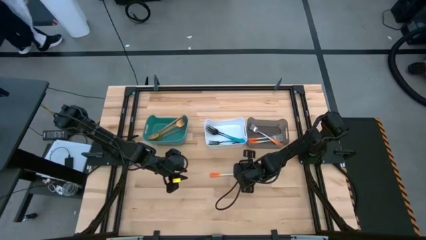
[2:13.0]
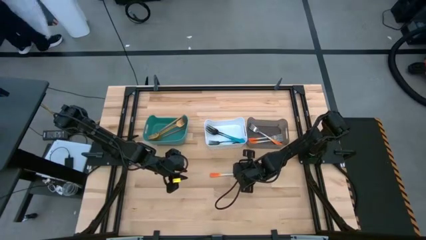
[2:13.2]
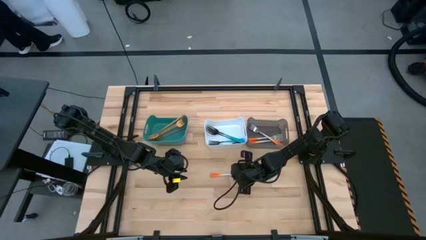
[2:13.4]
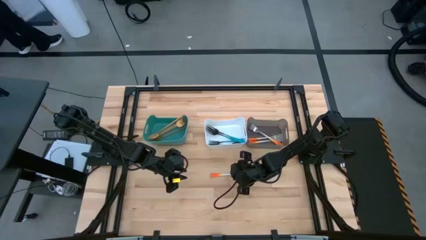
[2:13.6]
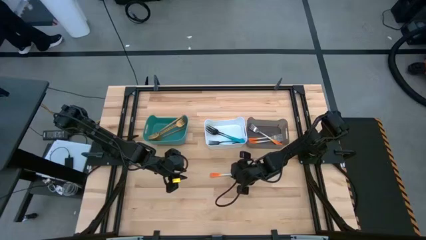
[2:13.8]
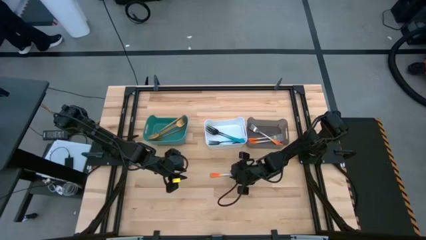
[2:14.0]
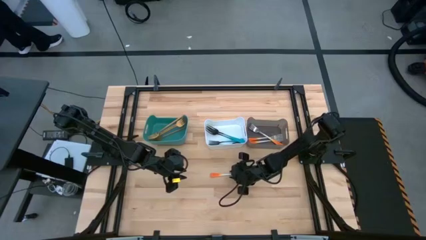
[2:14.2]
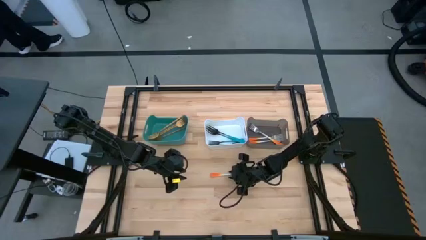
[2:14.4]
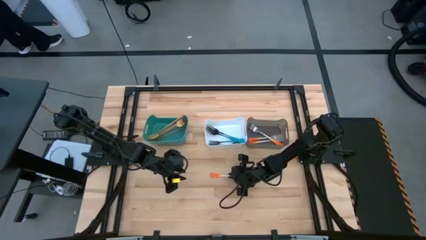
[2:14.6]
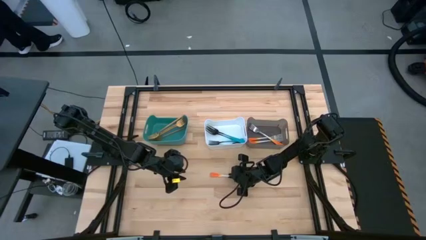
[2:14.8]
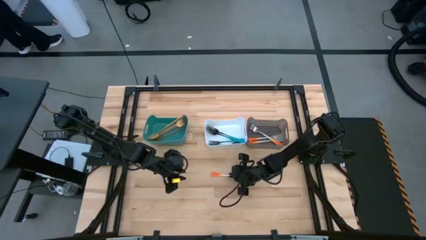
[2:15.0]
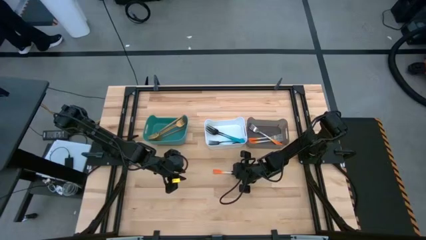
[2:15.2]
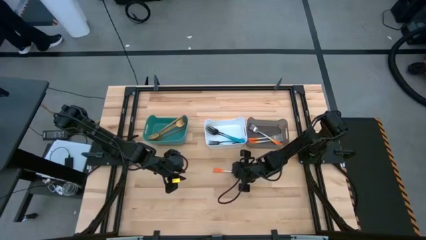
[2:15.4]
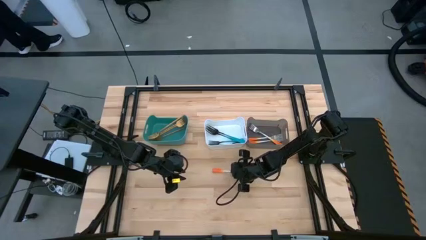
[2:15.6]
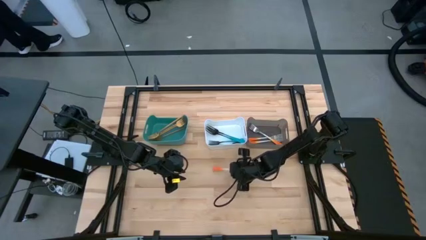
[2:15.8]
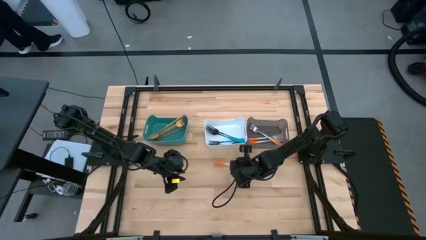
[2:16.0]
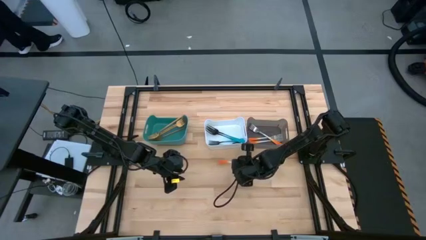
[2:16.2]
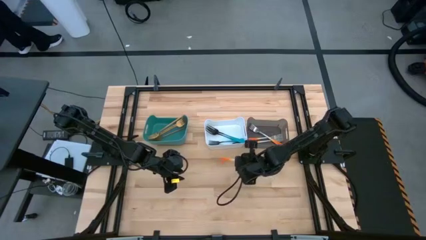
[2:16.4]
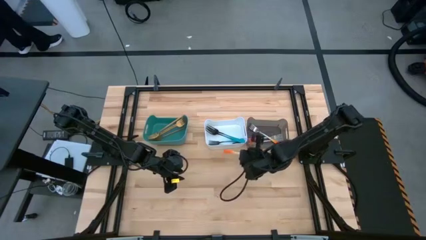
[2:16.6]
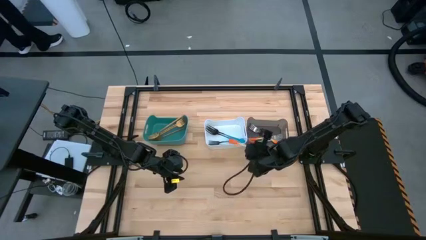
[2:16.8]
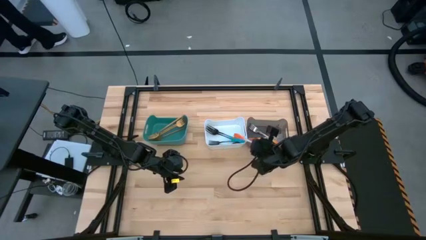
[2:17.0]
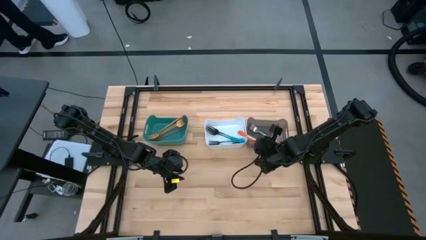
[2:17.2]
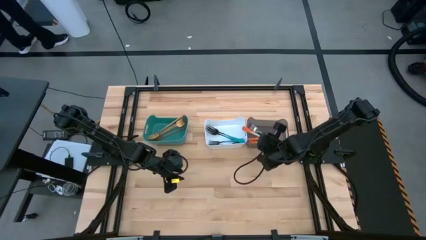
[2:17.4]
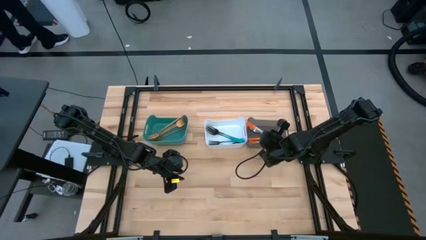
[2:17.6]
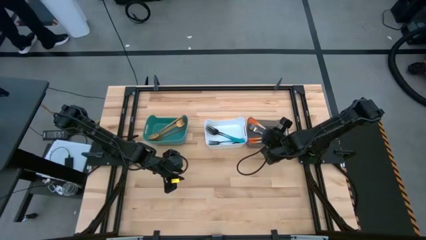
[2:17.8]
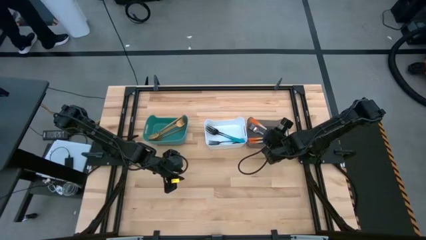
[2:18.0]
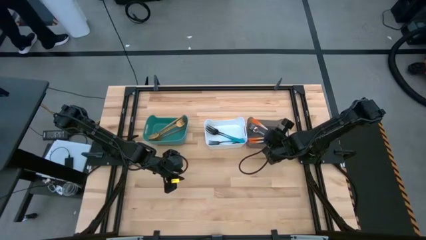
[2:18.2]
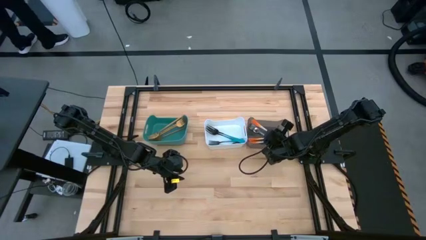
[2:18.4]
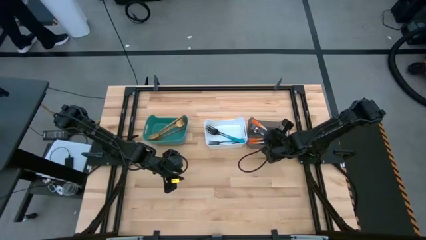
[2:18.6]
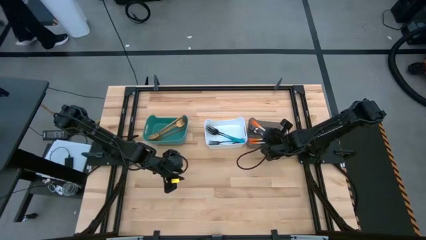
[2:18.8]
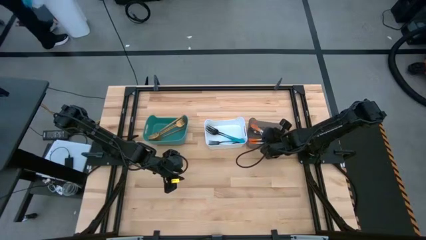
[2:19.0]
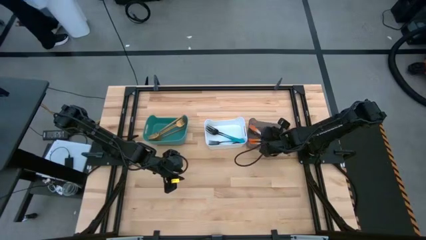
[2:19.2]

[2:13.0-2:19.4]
Task: Sort silverware by color (type)
Put the orange fork into the transparent black bin

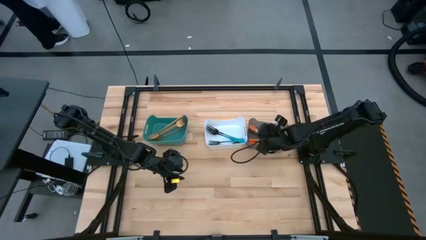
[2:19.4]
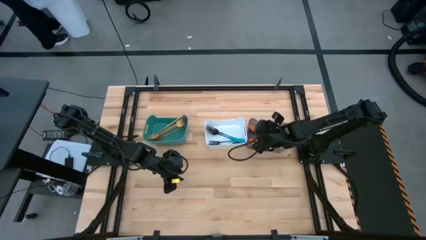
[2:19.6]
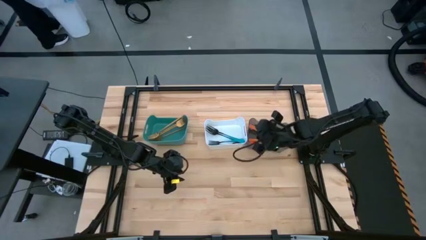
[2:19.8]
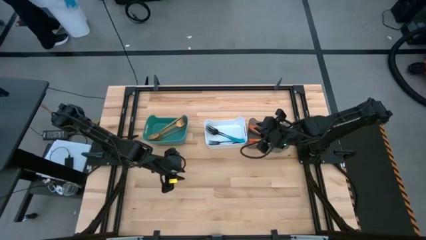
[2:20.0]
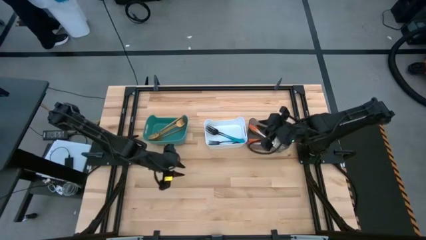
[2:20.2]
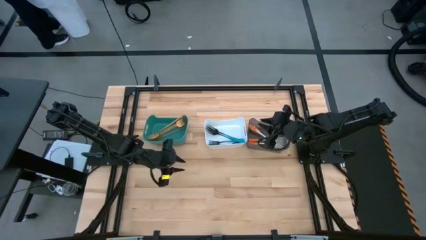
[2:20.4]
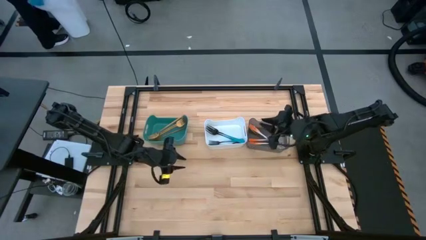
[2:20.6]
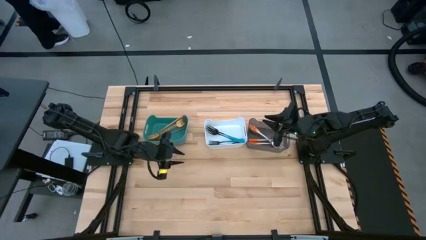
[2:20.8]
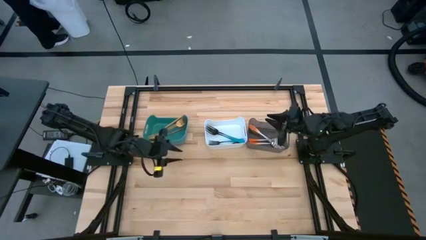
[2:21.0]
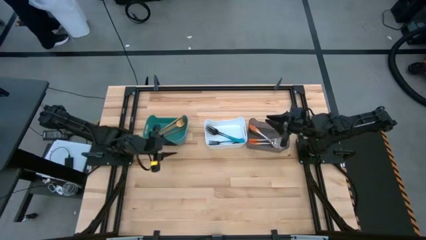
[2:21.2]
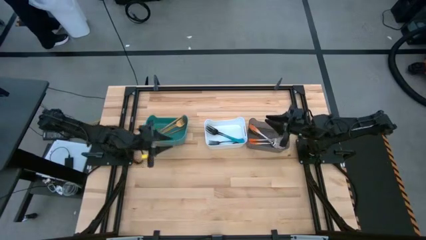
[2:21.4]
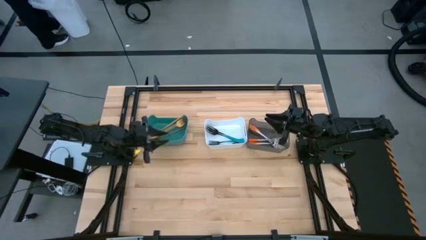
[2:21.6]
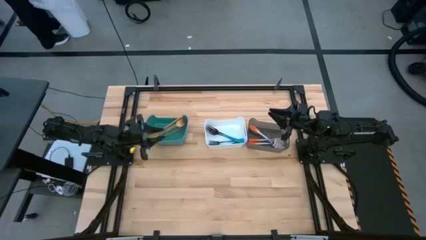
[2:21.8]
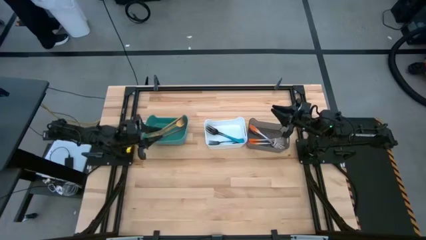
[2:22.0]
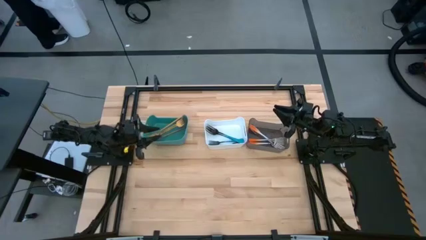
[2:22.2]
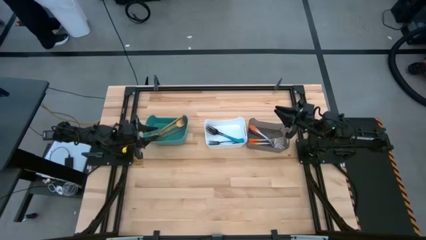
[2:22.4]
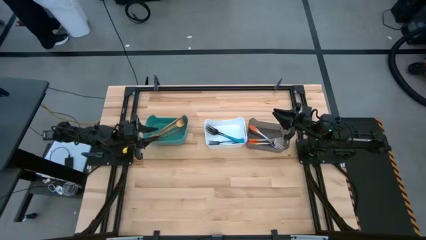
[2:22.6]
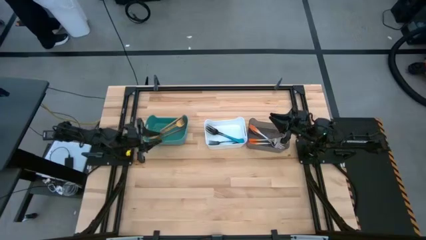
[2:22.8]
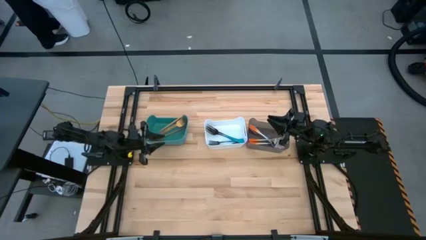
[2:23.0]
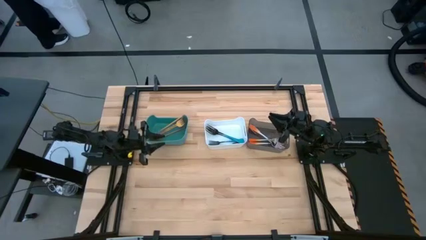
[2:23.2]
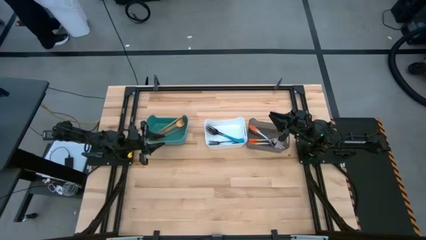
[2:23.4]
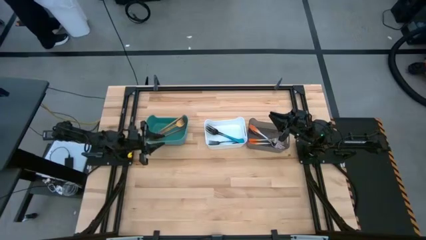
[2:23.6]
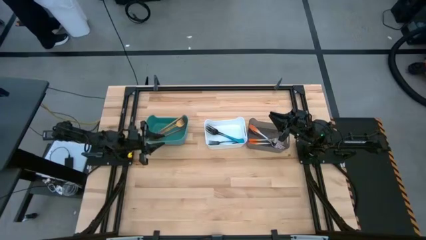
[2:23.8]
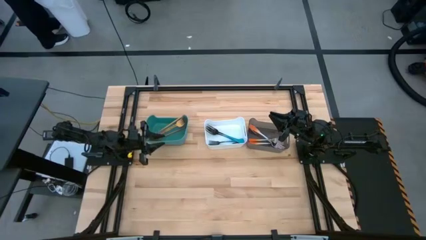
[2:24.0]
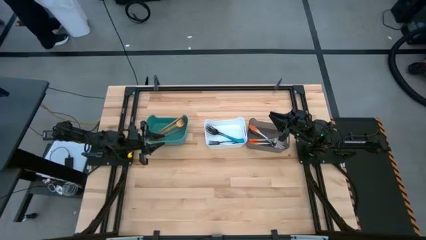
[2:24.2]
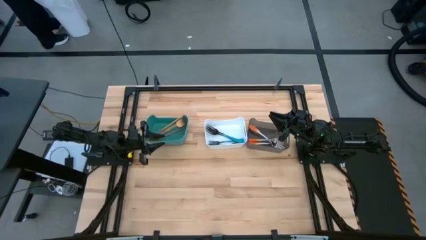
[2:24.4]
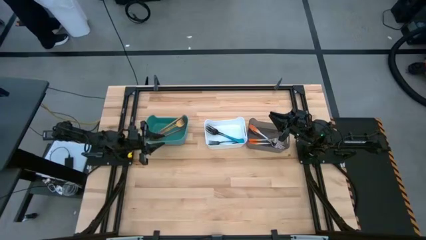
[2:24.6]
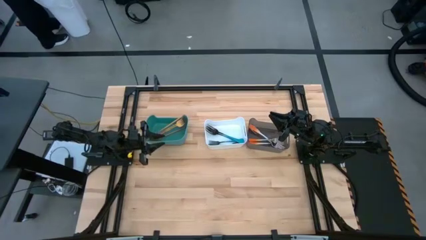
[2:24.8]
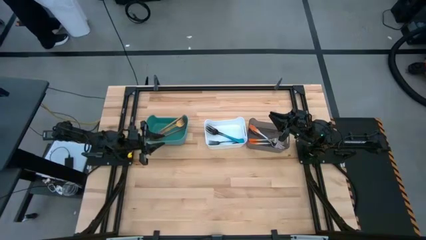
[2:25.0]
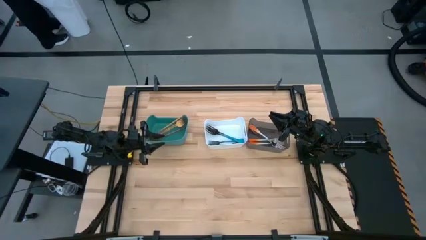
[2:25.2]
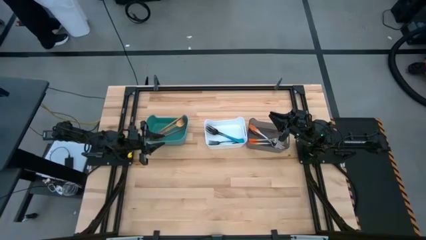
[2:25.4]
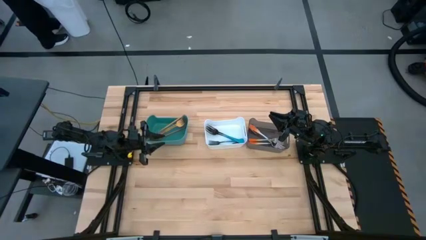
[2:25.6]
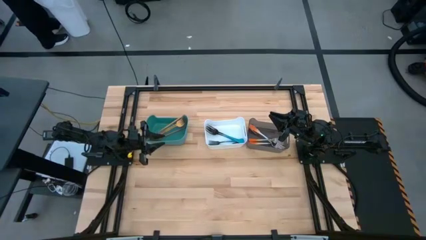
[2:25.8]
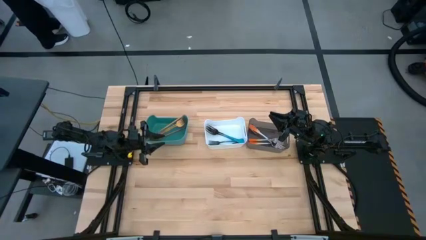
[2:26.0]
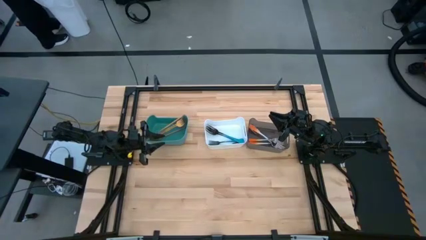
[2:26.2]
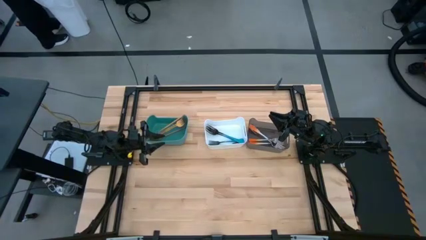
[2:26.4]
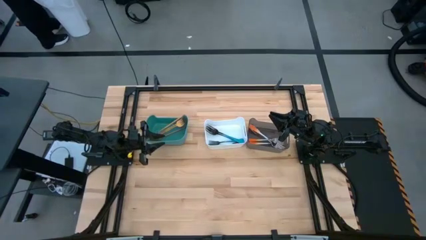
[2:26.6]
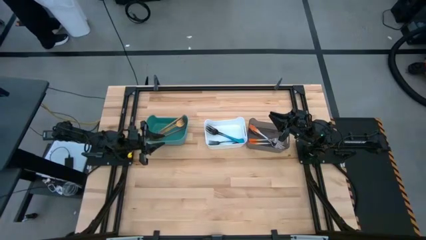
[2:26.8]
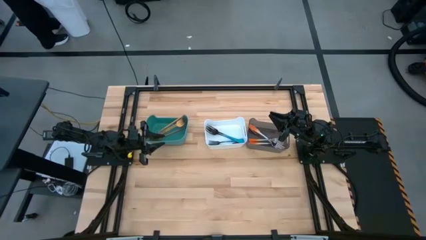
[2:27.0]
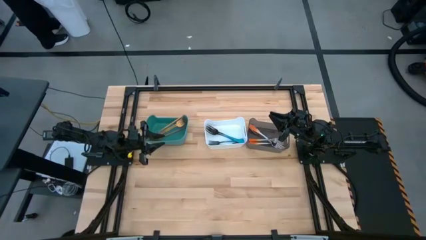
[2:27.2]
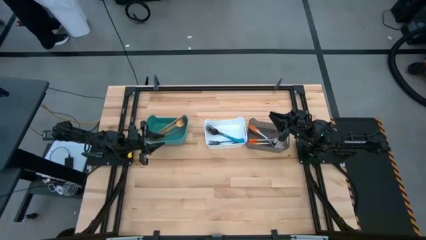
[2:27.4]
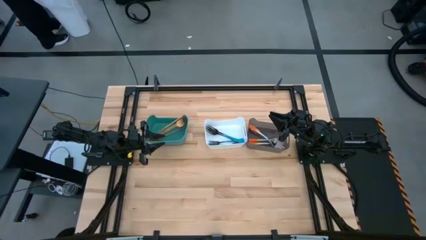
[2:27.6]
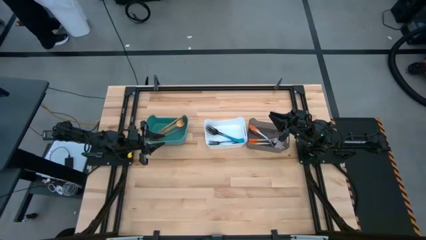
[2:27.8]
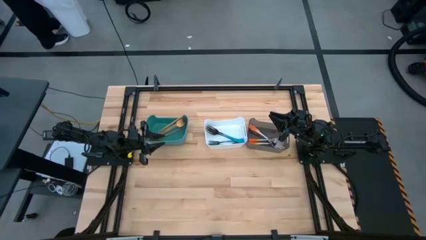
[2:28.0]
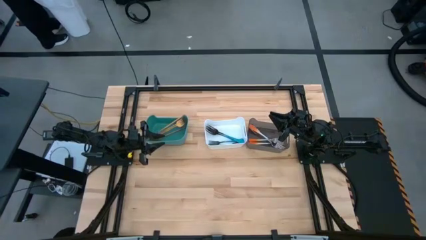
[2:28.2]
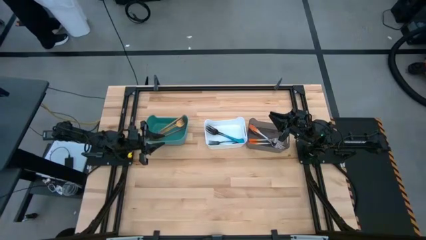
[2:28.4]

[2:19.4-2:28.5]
Return to Home Position
